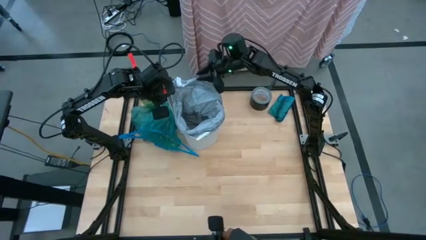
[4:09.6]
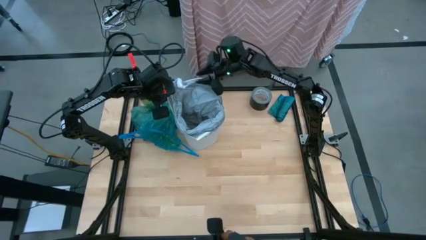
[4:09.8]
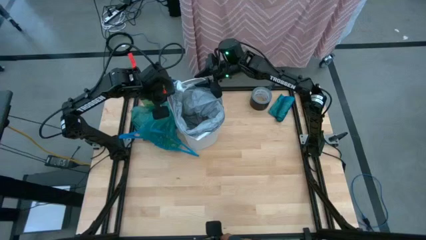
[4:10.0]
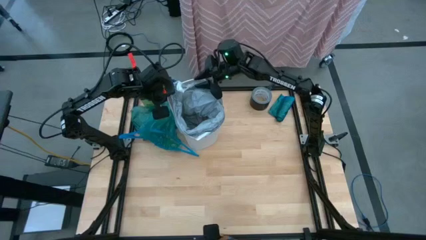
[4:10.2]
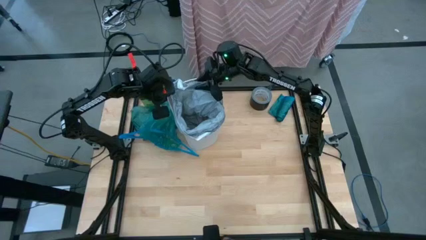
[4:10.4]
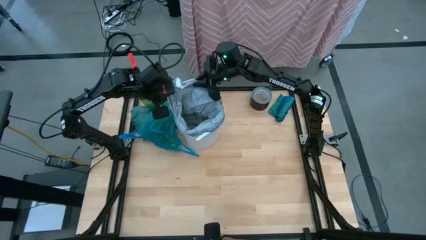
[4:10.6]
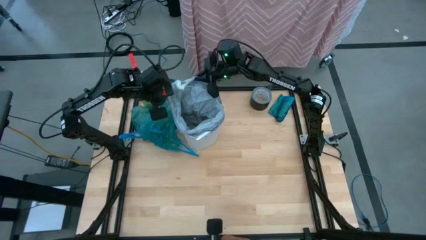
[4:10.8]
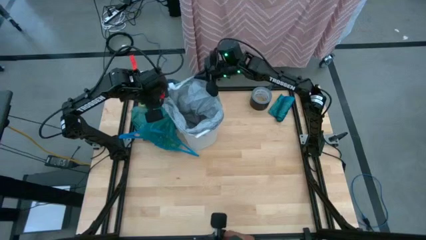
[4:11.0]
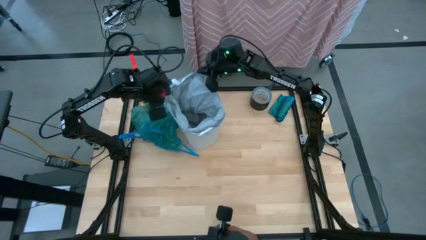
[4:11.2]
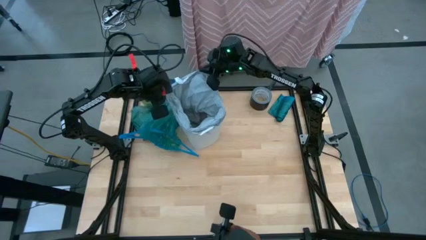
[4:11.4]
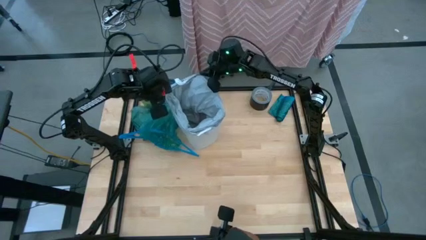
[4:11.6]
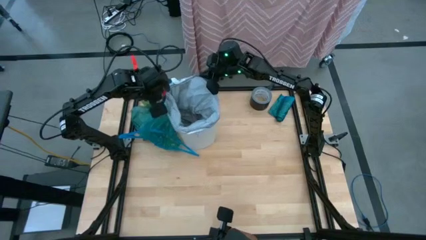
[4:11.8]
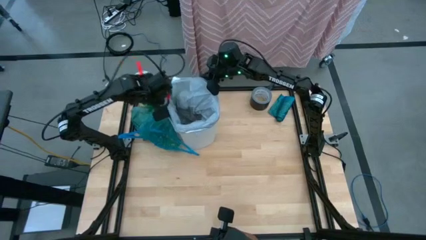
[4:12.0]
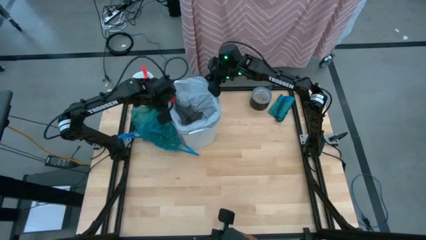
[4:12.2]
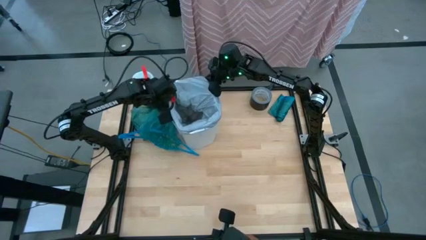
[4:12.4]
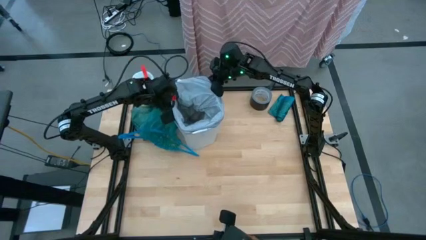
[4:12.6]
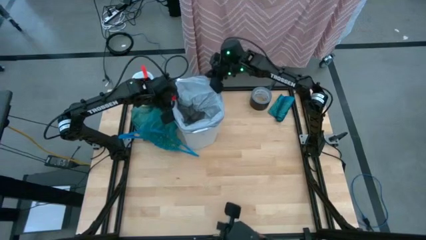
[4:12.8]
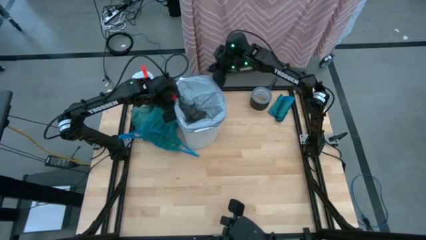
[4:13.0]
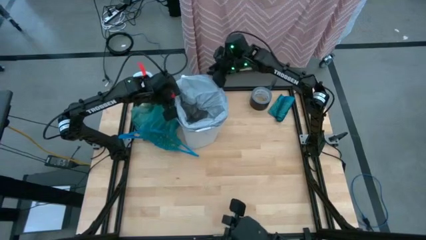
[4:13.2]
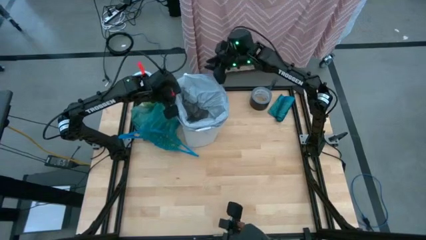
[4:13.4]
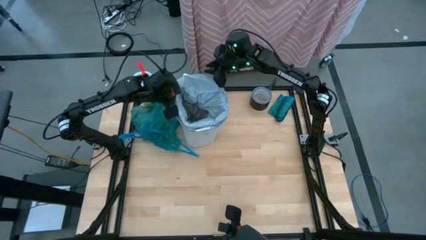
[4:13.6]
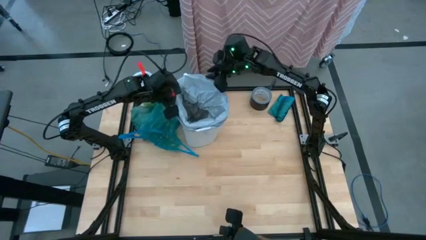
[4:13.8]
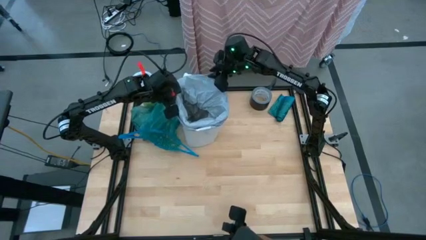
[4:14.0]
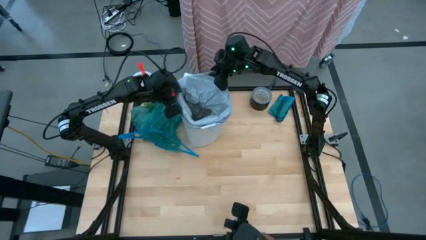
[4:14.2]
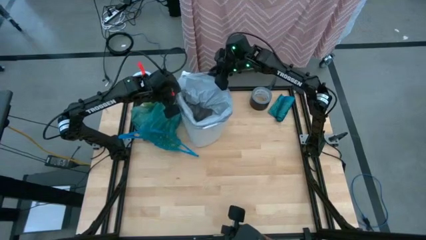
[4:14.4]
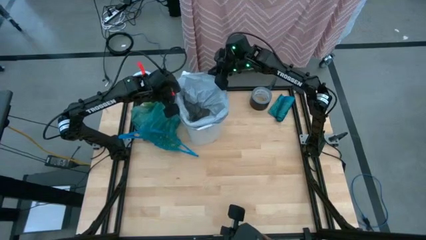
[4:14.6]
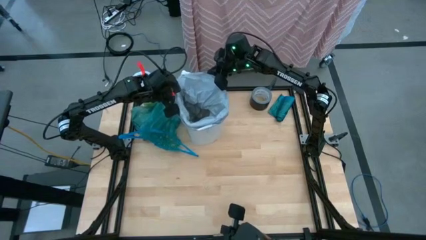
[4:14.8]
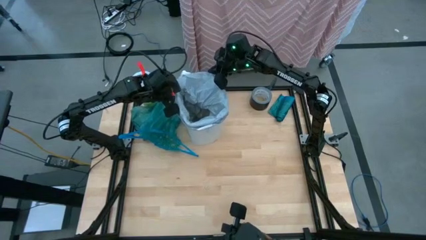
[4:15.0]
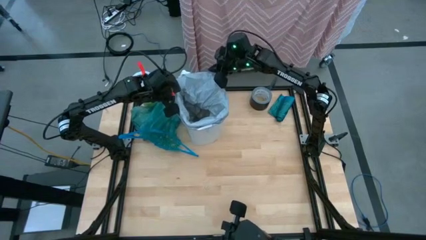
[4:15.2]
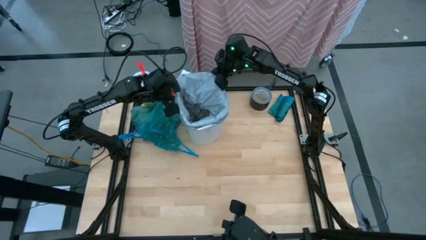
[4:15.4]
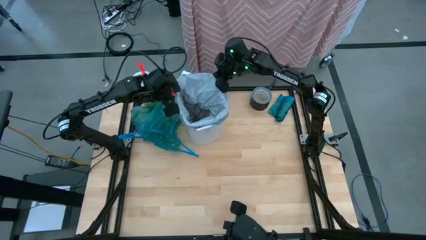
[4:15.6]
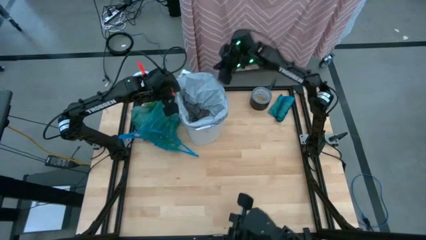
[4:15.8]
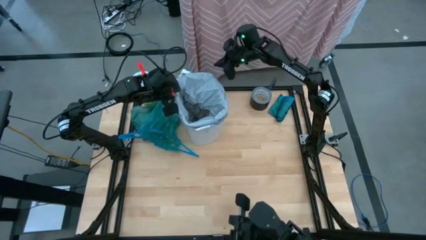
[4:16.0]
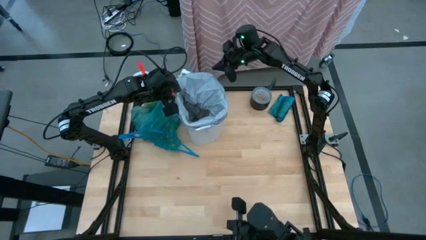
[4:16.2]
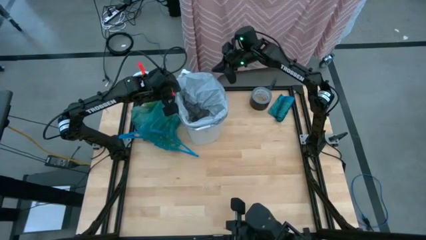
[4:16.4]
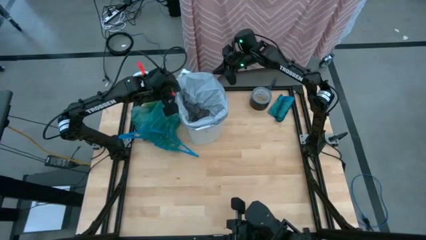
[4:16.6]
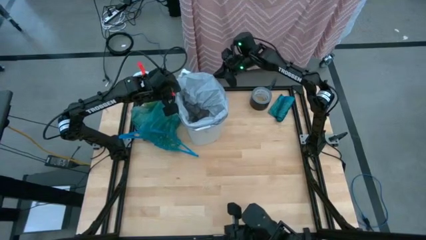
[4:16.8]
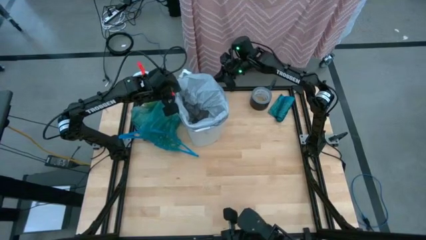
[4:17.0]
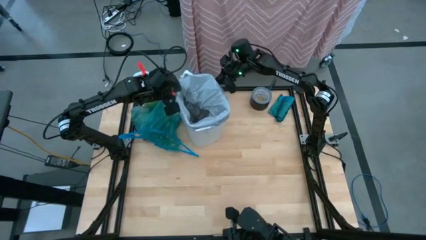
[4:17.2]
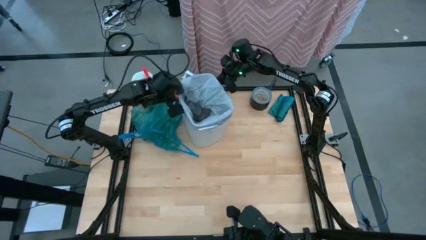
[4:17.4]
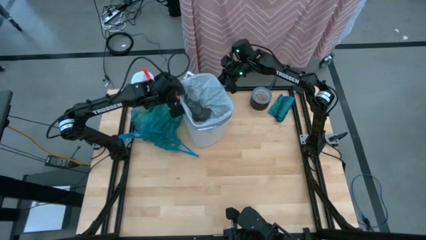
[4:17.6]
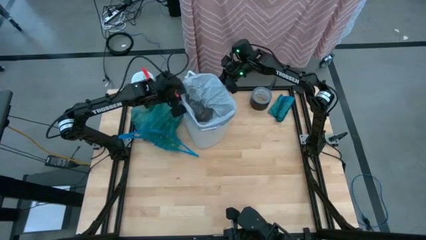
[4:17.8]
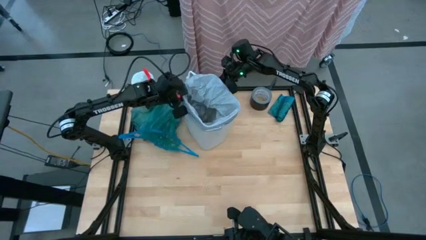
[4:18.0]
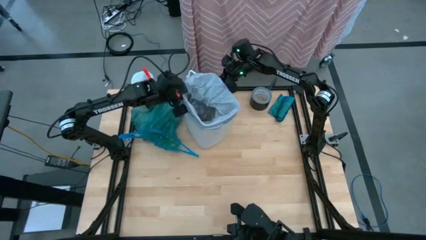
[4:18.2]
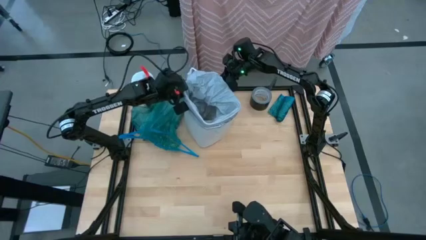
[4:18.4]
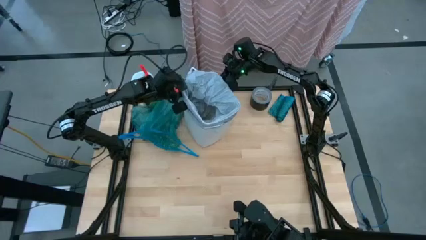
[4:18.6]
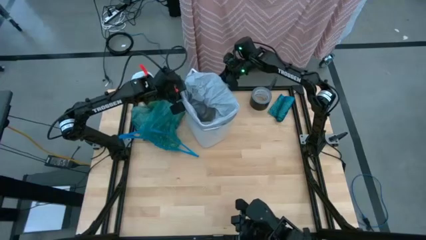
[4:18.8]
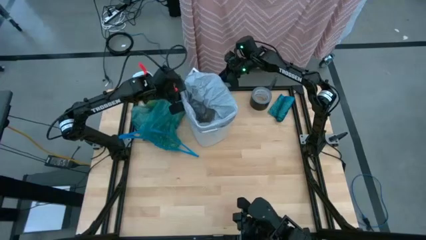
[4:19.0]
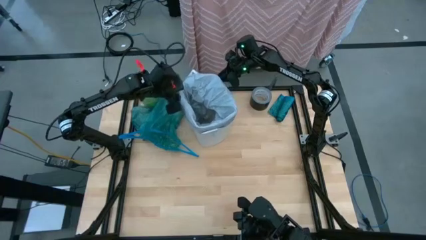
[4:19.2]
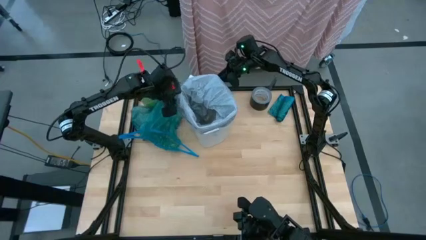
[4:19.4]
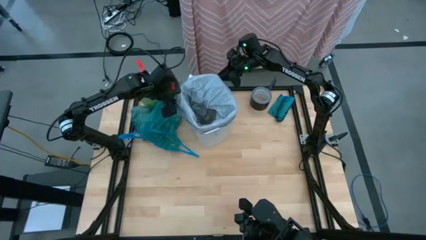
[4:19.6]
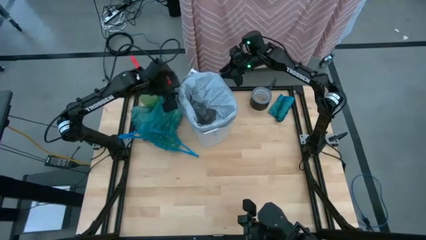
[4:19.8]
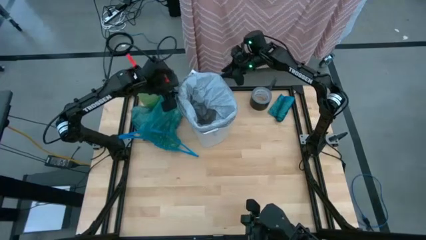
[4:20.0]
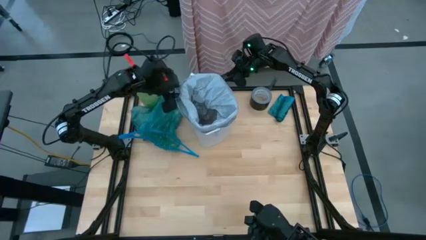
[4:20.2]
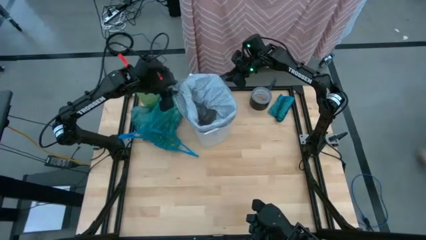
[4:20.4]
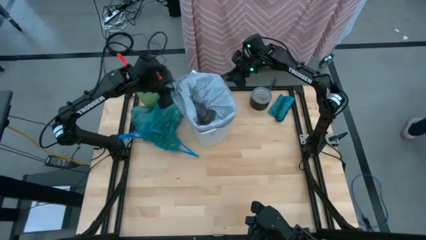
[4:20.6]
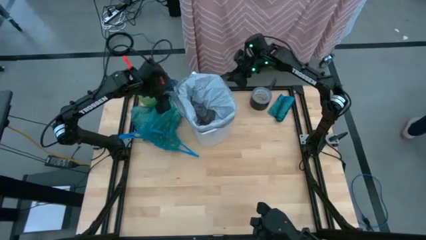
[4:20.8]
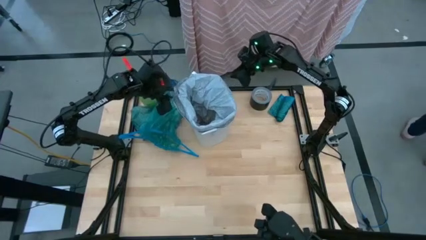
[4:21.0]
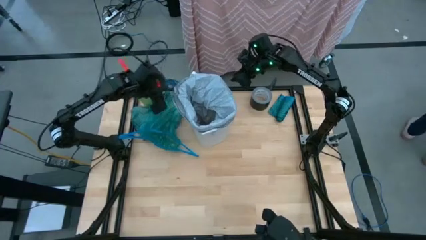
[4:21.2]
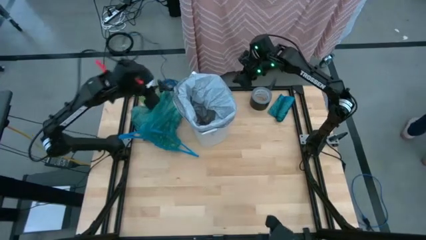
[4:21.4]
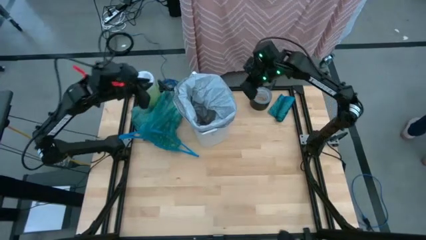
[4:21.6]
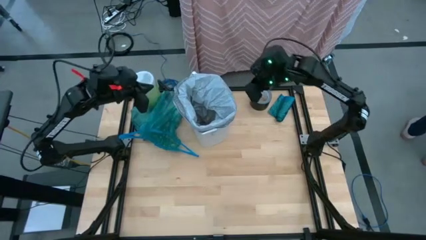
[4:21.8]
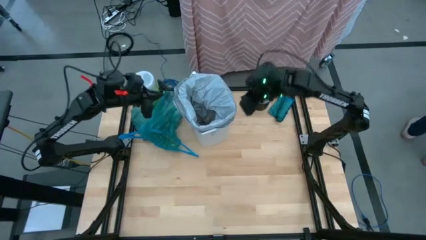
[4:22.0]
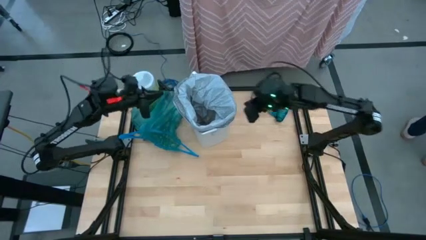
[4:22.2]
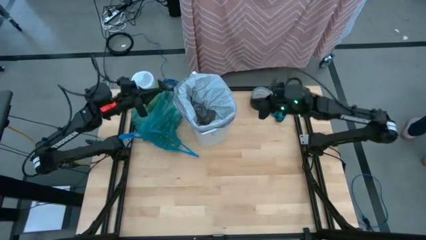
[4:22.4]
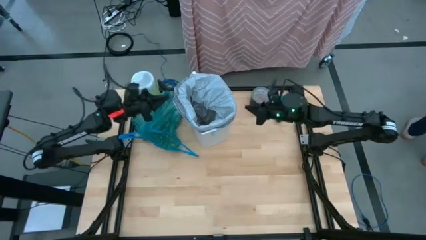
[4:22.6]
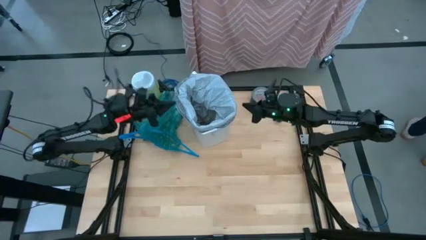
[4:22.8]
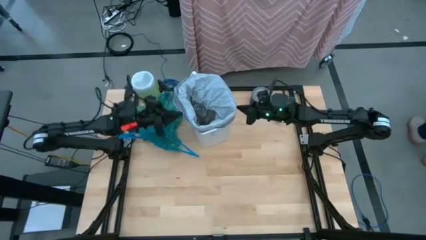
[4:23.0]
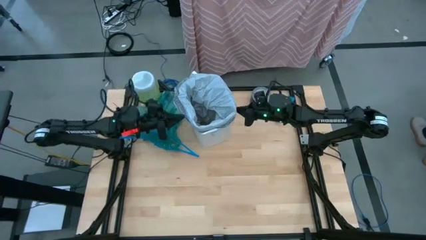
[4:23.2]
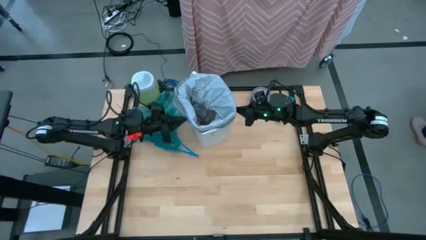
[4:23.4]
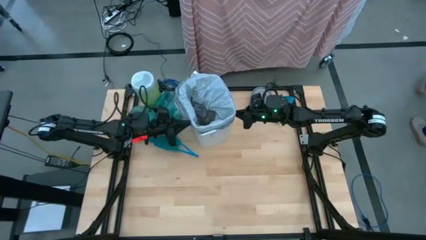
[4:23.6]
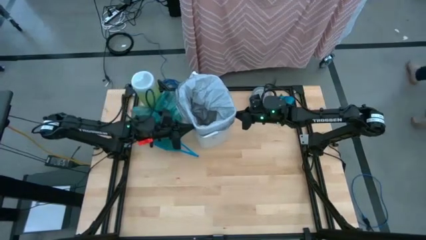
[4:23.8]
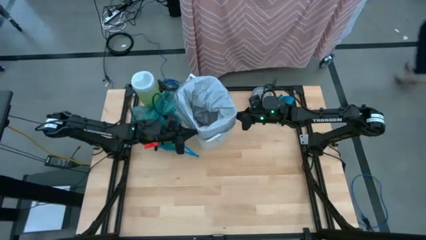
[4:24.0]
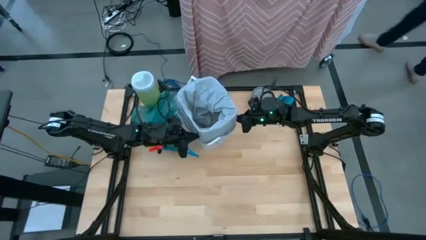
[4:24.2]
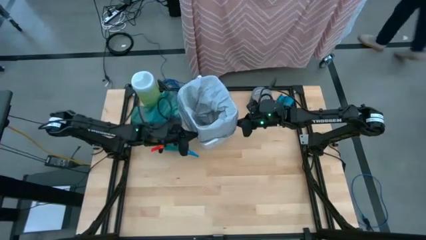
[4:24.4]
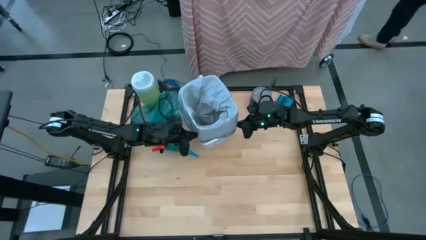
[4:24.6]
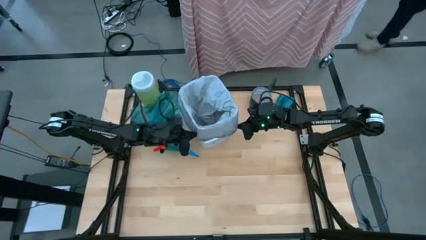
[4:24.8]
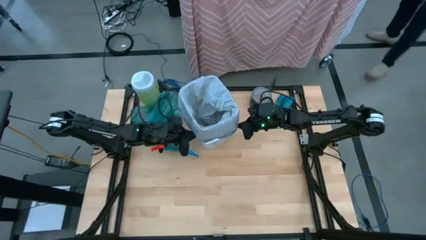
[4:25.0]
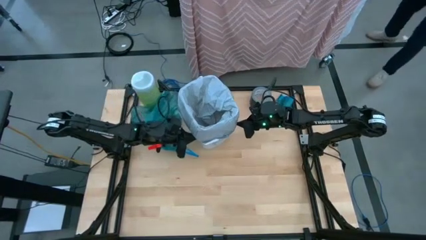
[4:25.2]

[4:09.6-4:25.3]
Task: place trash/remove bag and relplace
Insert the gray trash bag into the trash bin
